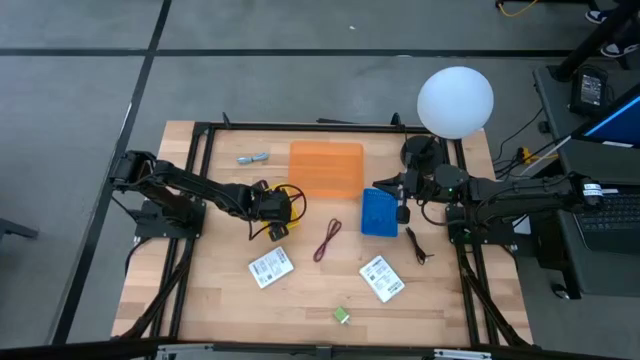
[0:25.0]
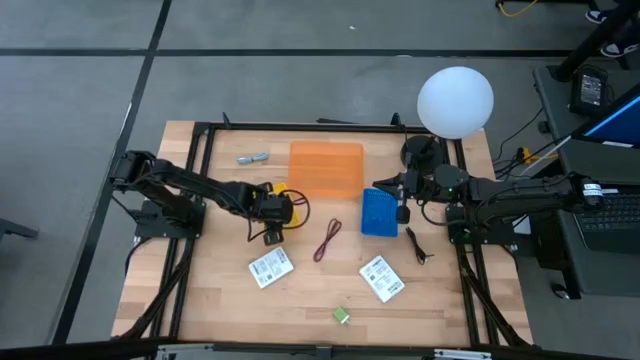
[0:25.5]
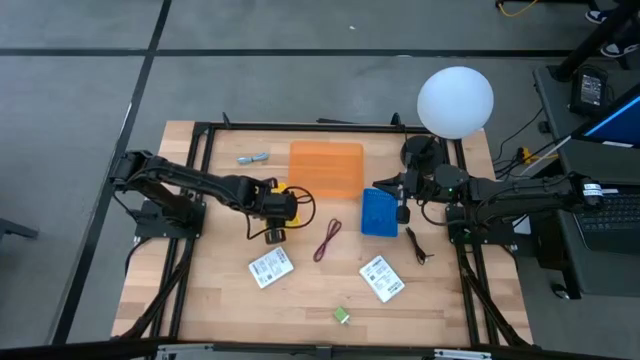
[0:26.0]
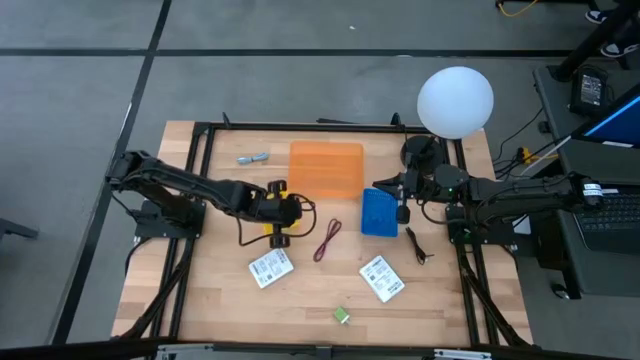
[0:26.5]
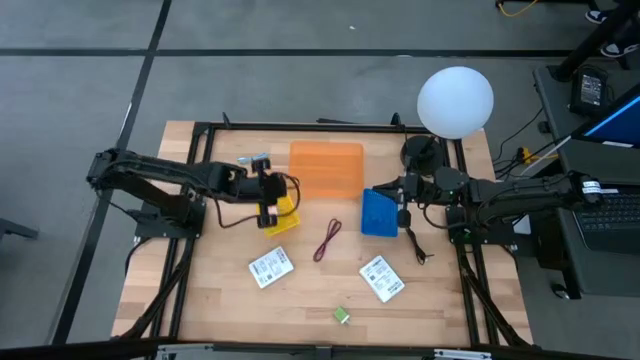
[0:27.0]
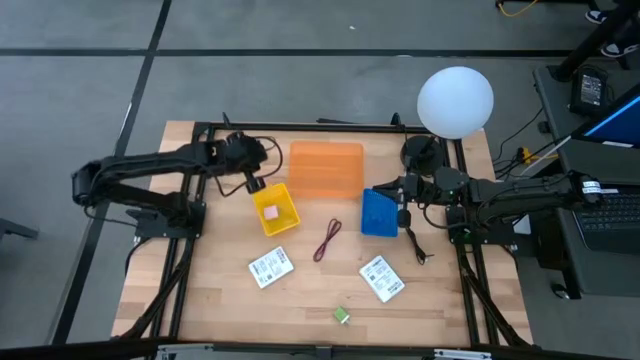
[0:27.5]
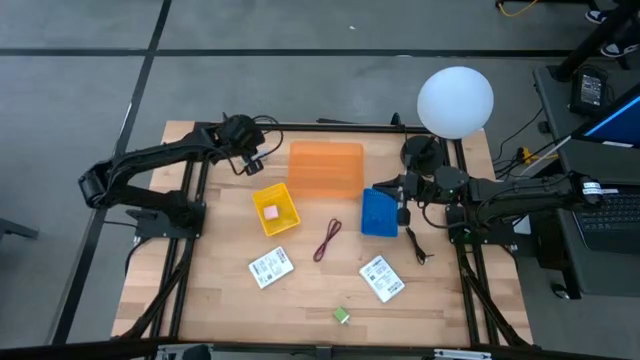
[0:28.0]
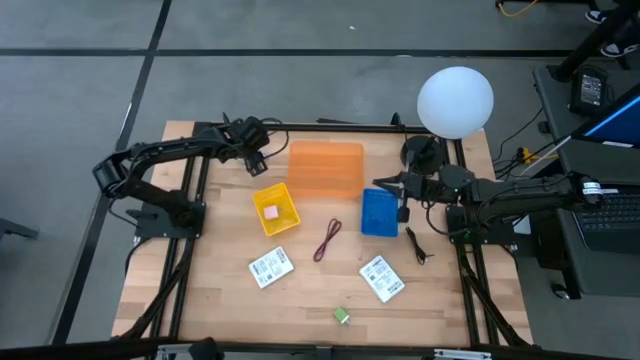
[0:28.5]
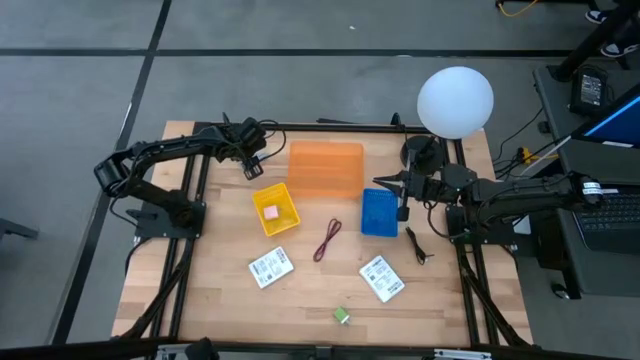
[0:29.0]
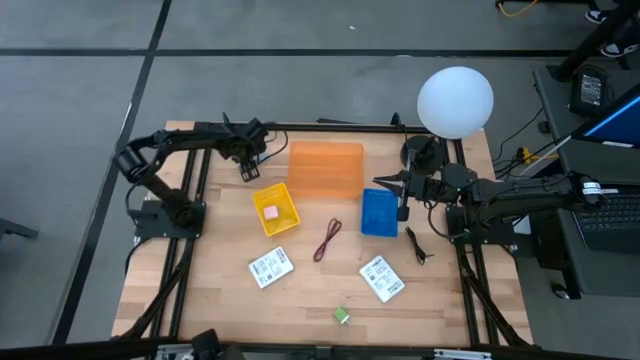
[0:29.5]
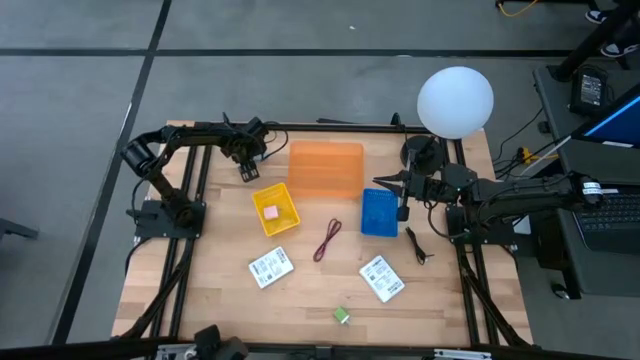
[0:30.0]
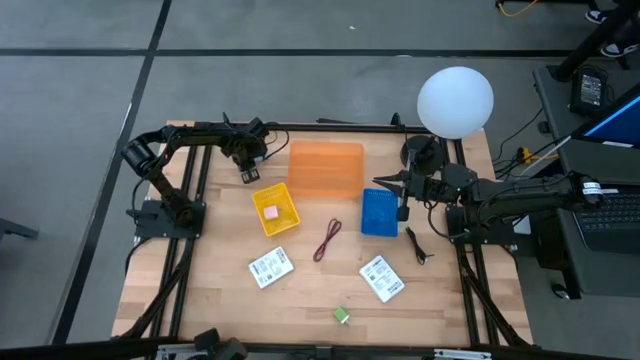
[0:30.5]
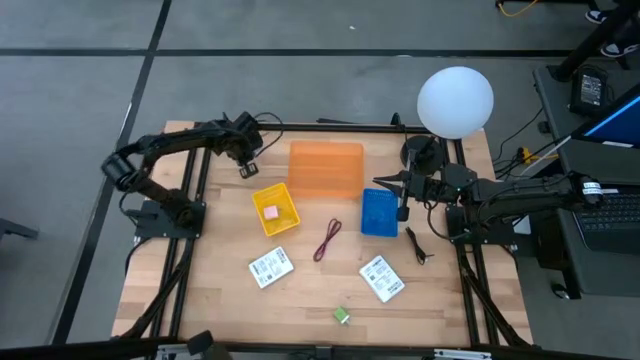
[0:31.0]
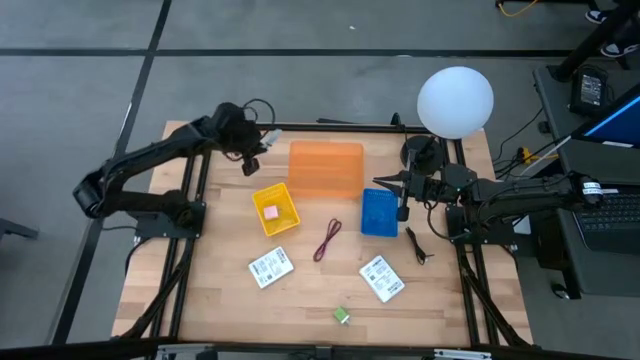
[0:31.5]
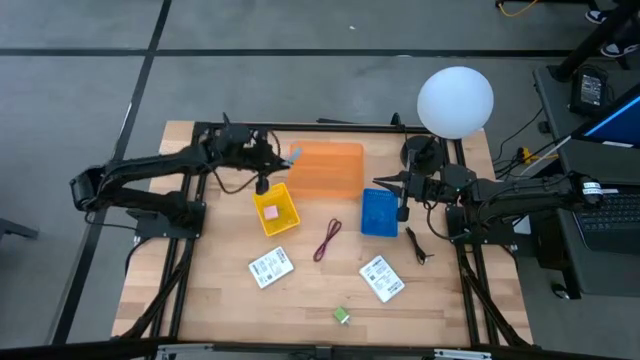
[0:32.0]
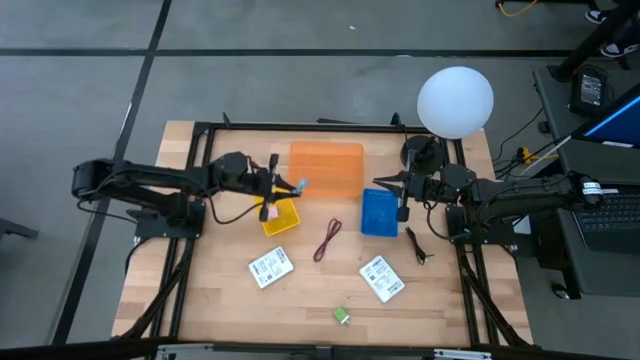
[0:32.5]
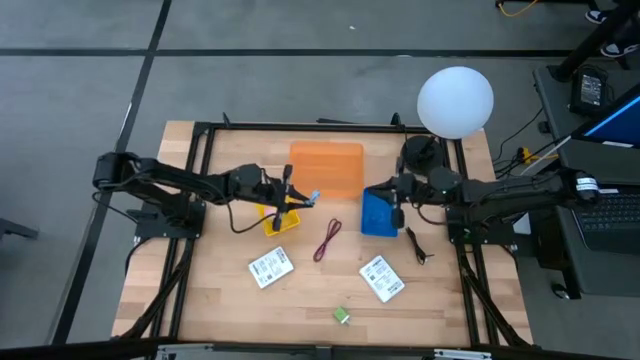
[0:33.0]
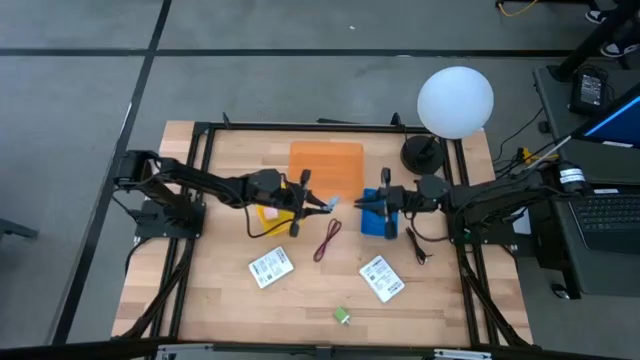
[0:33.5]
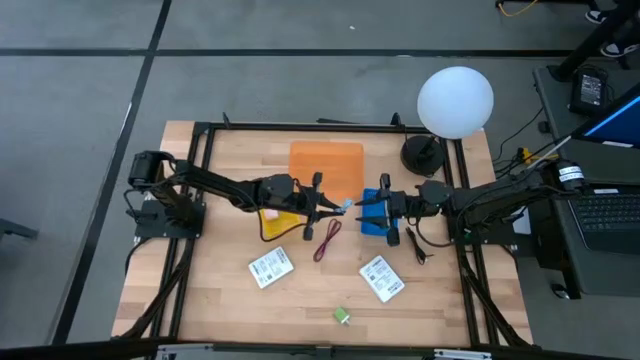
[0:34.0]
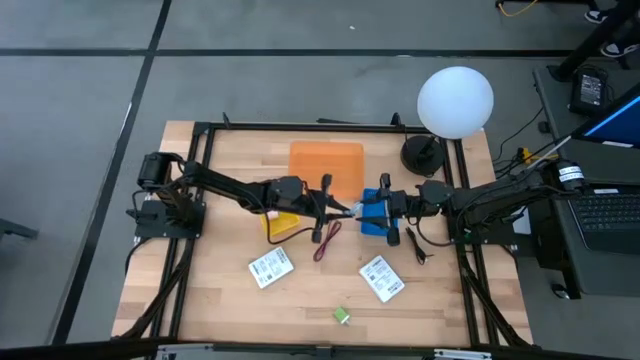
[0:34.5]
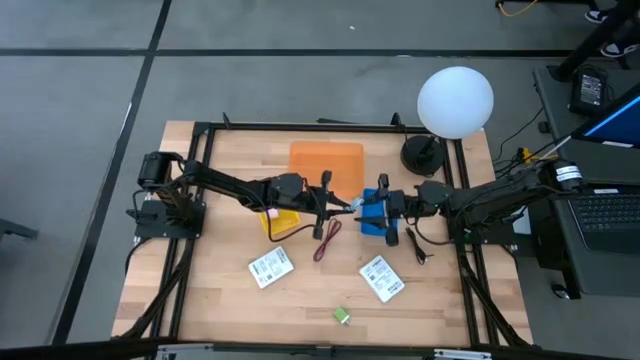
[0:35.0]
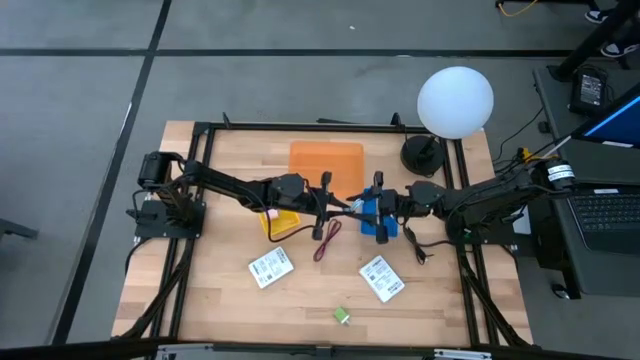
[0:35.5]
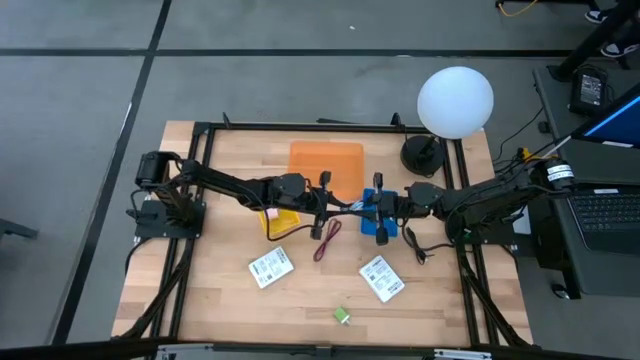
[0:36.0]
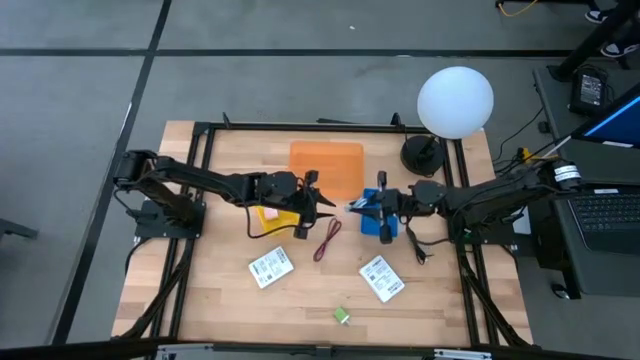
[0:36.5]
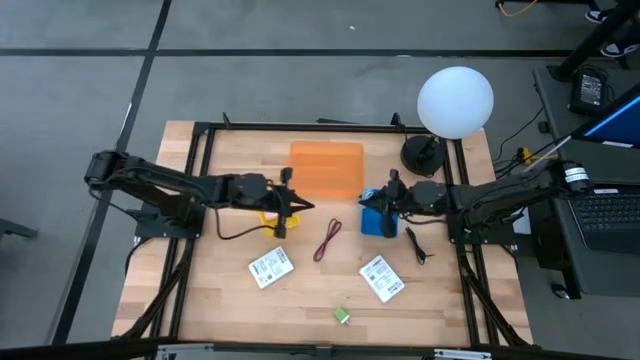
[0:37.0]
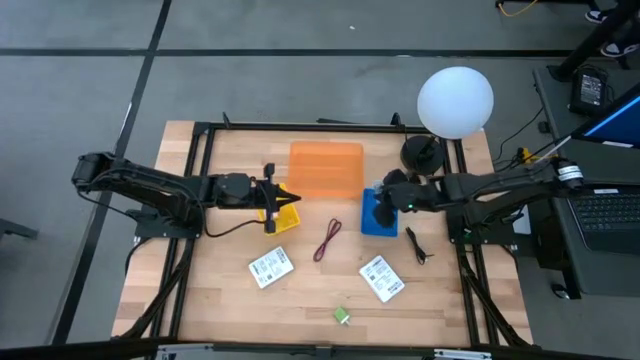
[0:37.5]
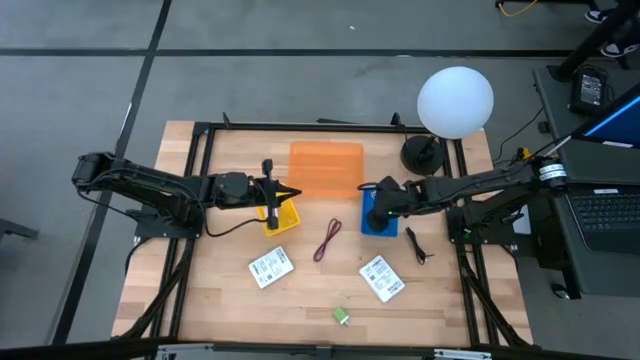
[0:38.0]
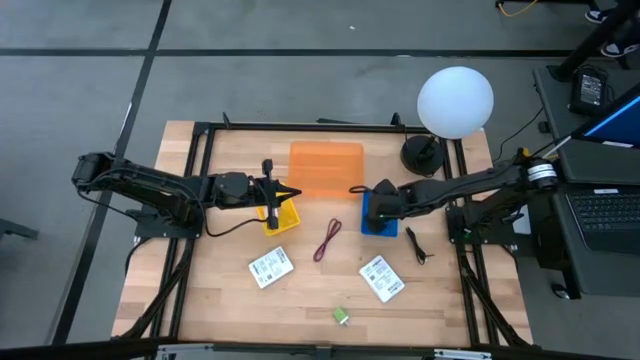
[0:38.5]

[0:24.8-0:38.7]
Task: Pick and place items into bin
Put the blue charger cable into the blue bin

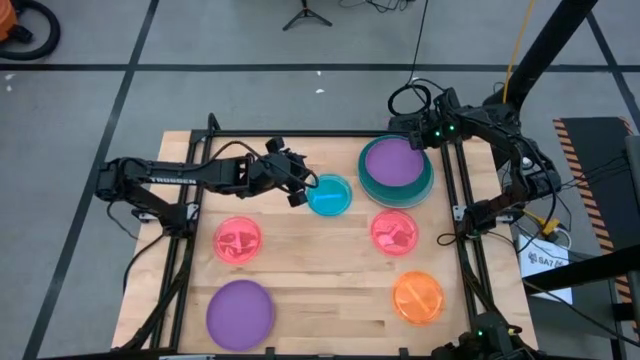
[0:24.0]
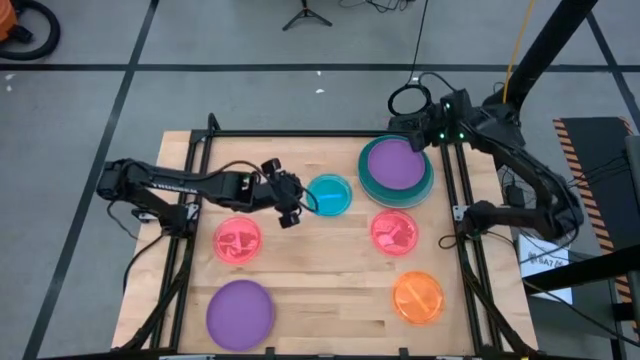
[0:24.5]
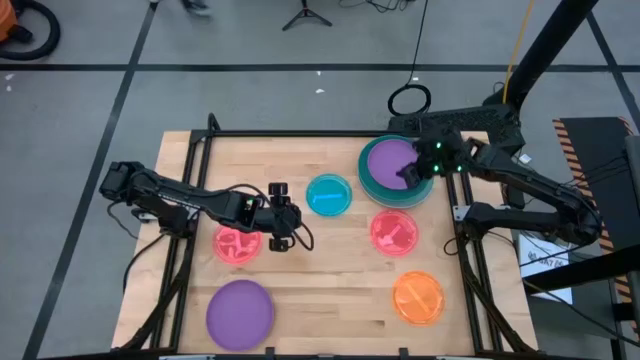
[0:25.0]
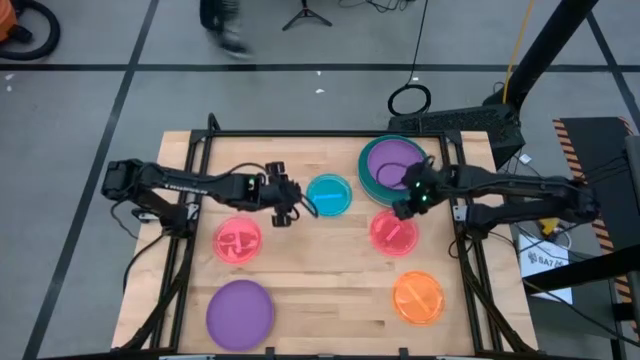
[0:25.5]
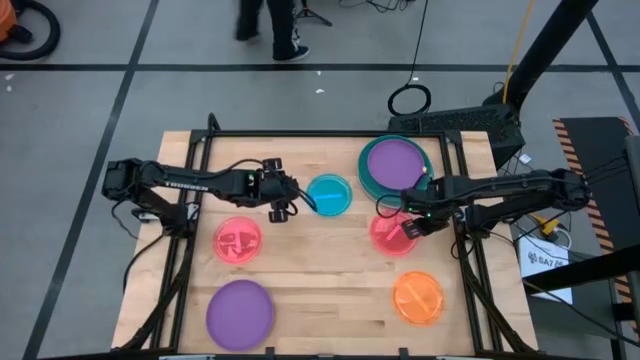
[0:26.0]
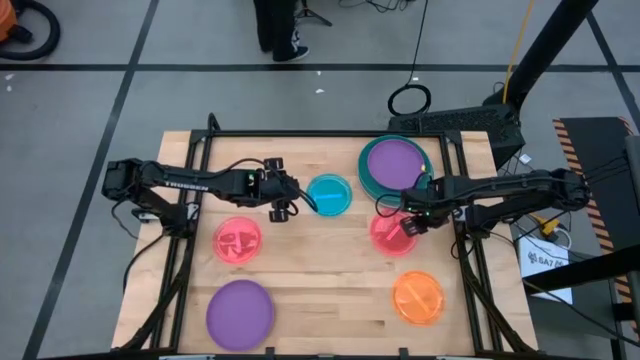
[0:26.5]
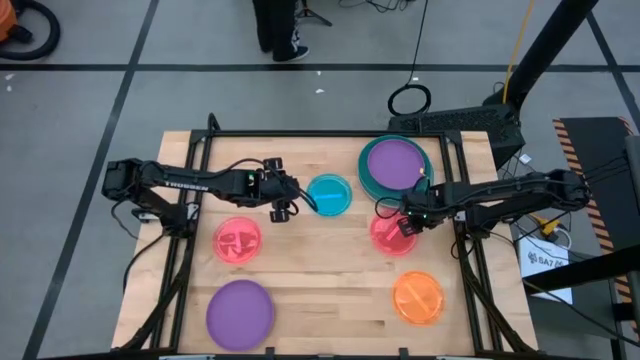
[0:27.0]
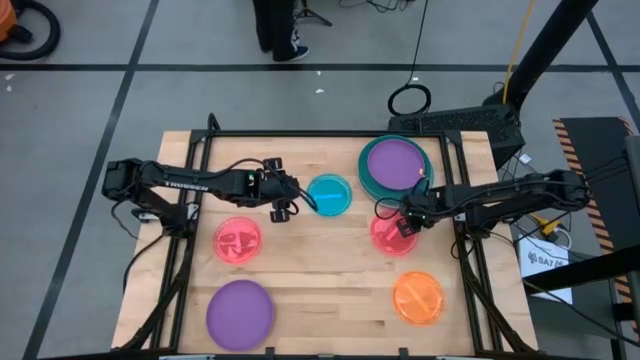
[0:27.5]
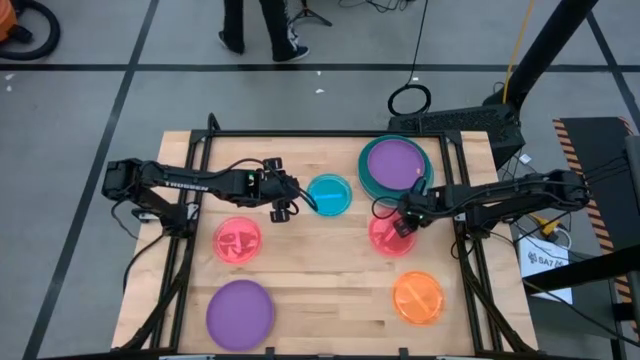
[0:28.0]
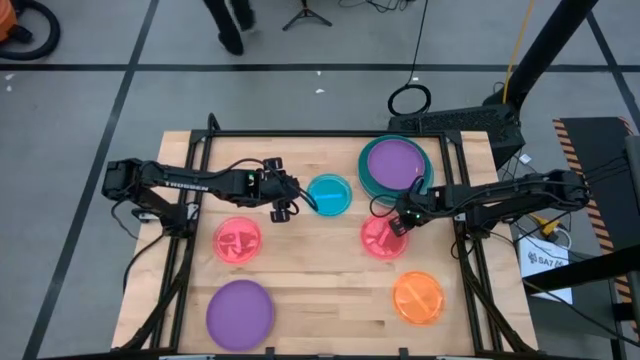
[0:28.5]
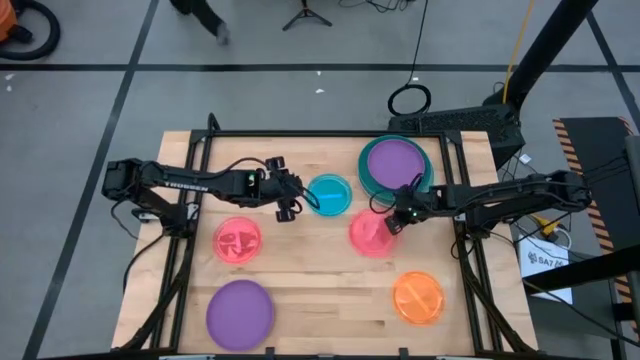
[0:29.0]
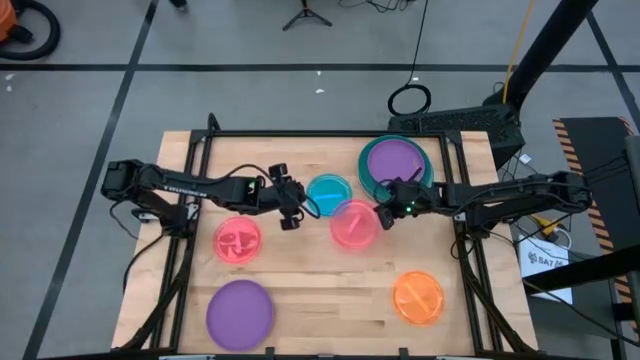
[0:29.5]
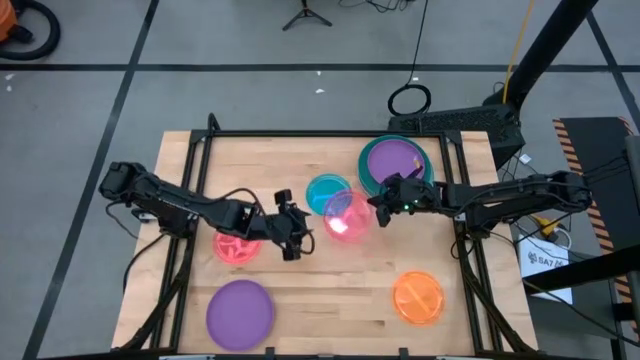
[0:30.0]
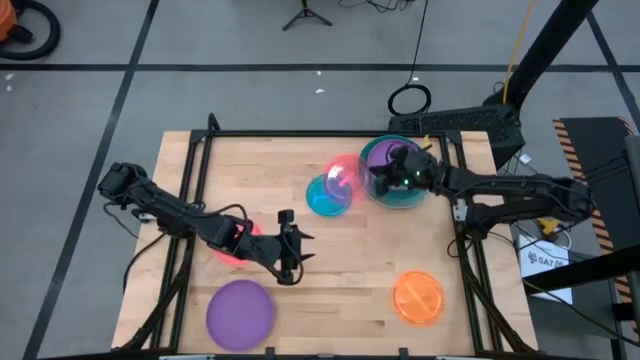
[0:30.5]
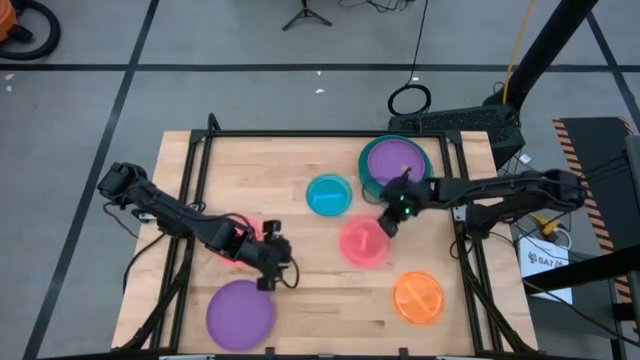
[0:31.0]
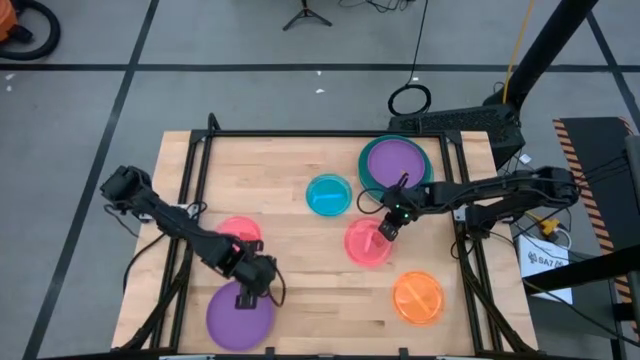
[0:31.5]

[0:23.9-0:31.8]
Task: Stack plastic plates
Stack the purple plate on top of the other purple plate
